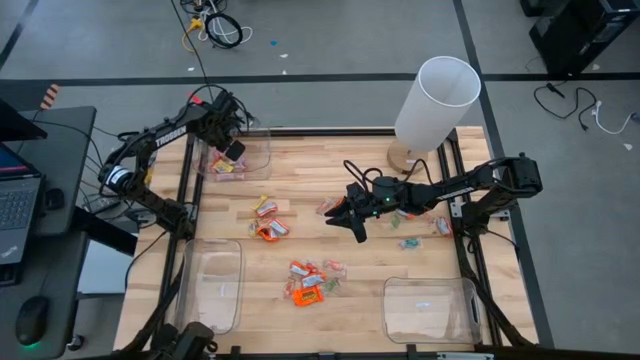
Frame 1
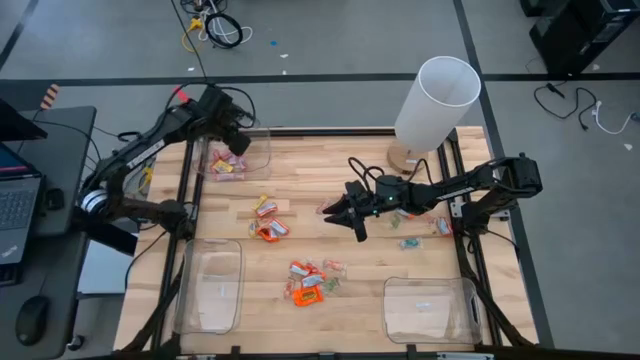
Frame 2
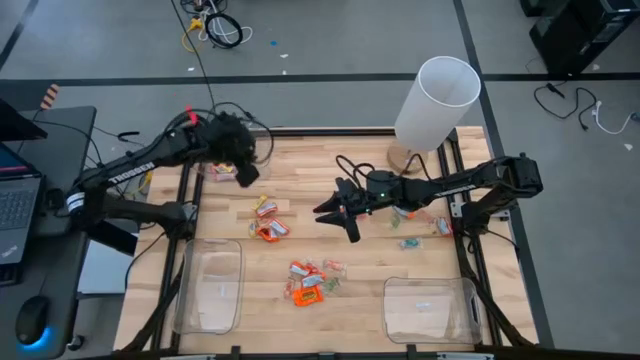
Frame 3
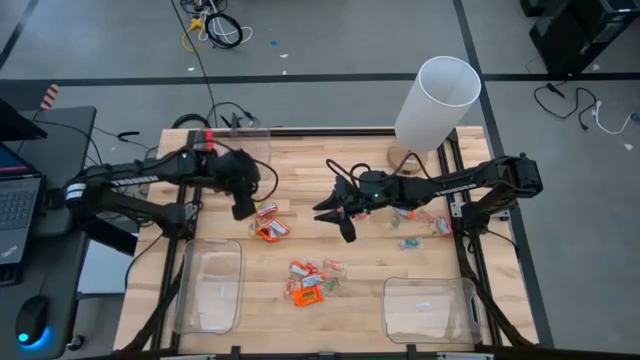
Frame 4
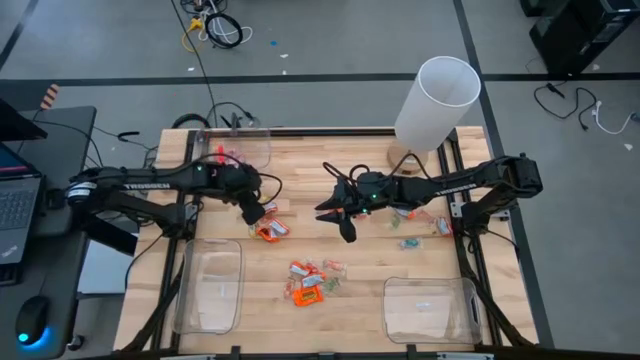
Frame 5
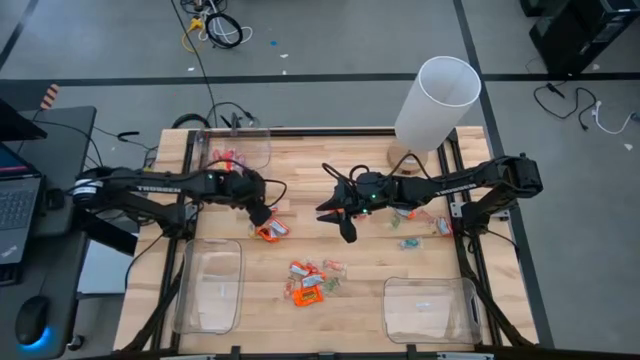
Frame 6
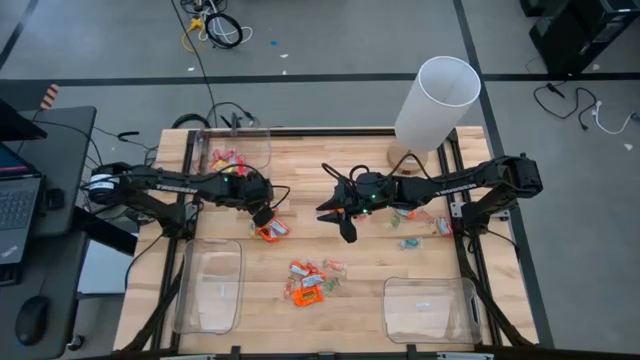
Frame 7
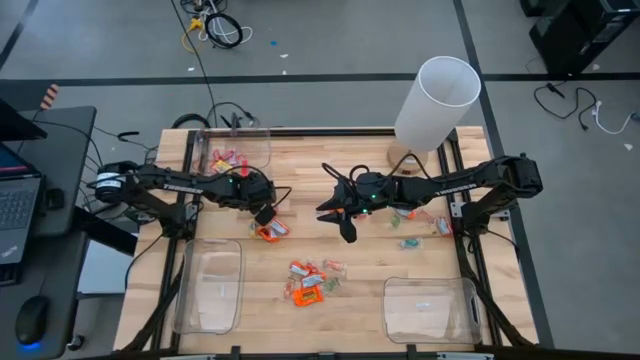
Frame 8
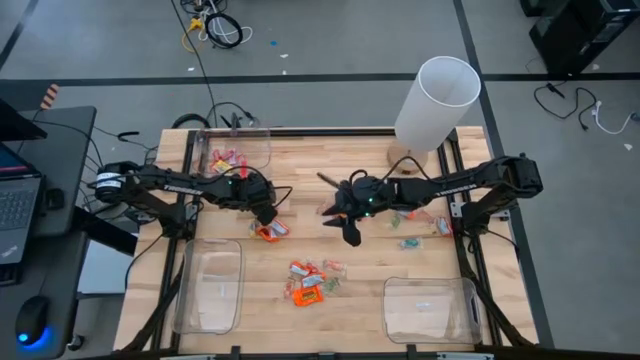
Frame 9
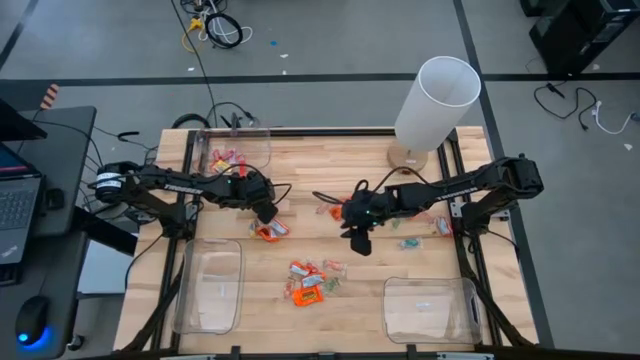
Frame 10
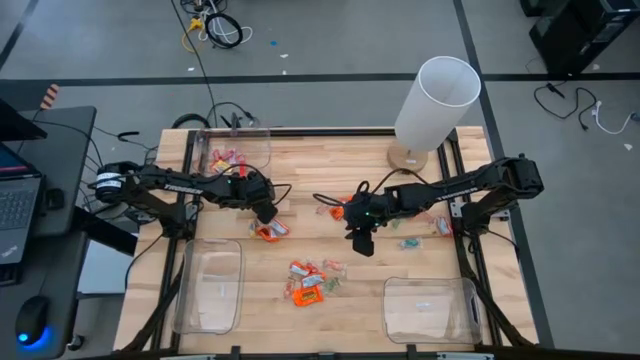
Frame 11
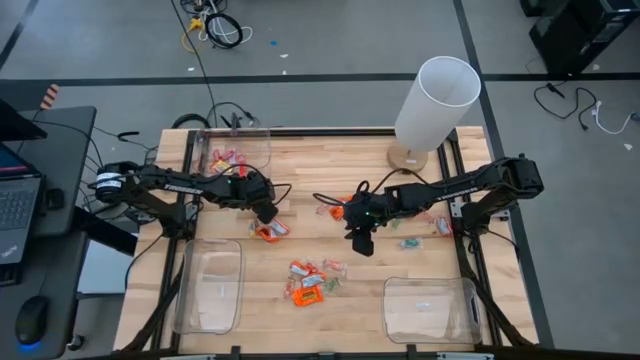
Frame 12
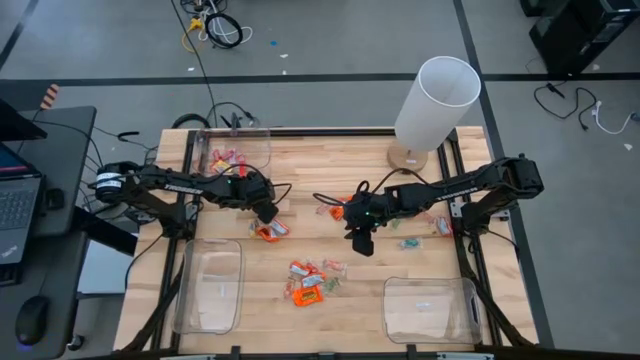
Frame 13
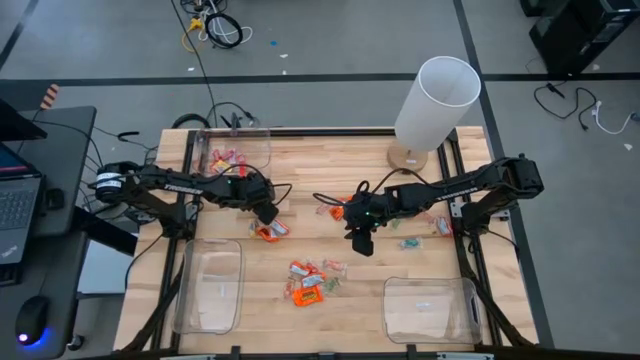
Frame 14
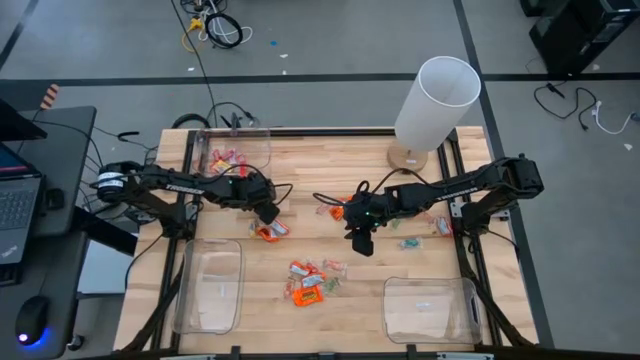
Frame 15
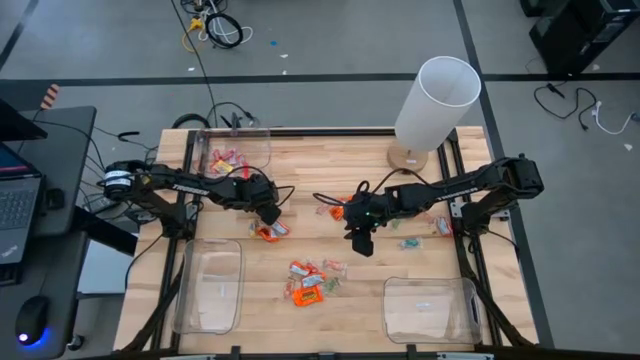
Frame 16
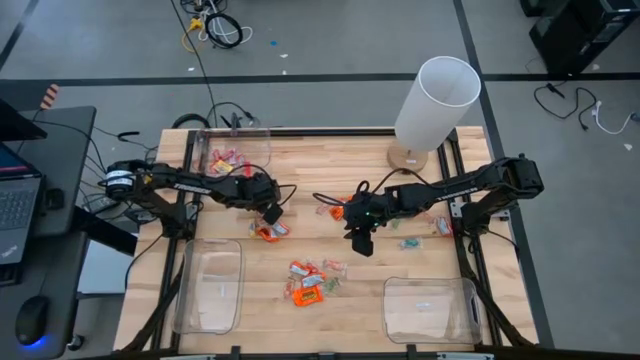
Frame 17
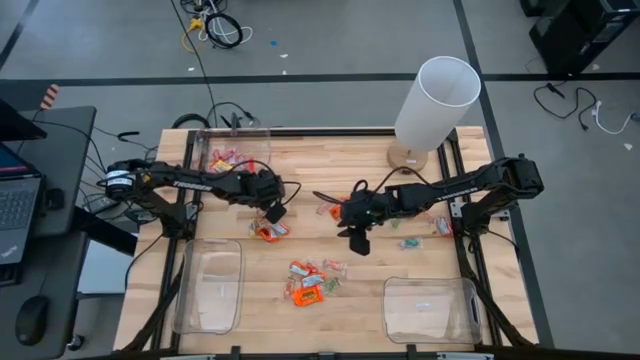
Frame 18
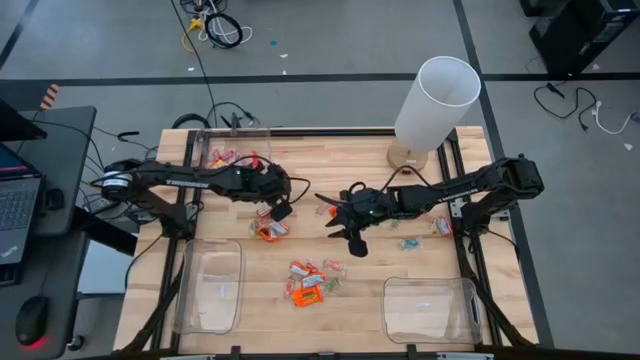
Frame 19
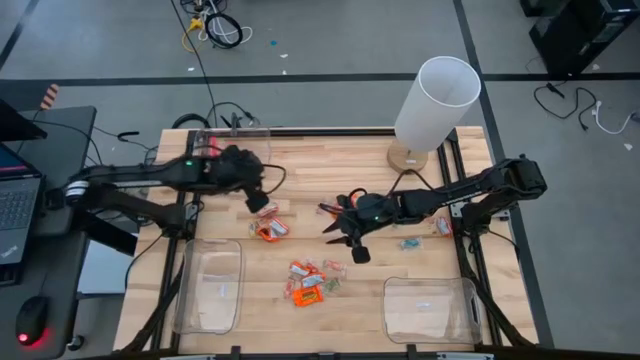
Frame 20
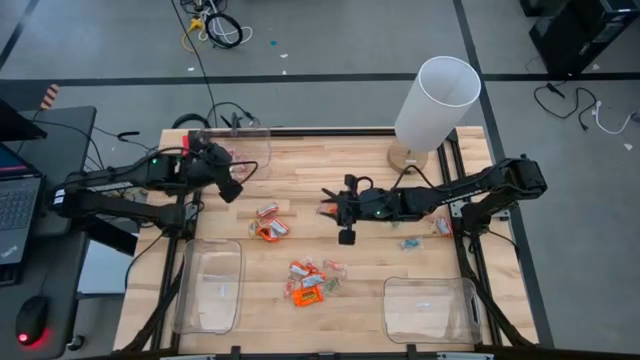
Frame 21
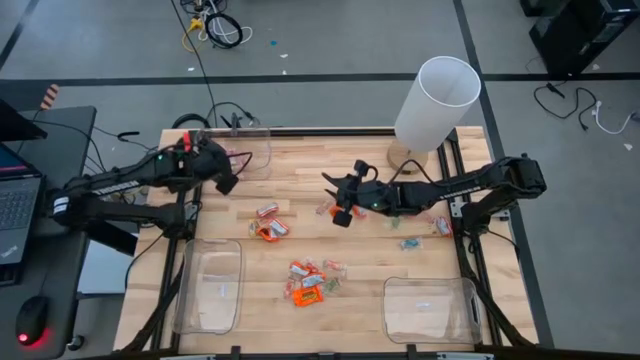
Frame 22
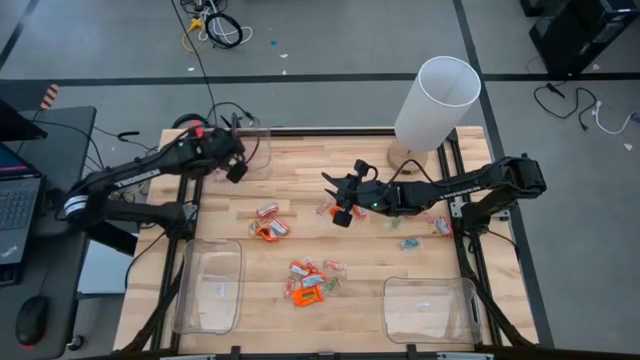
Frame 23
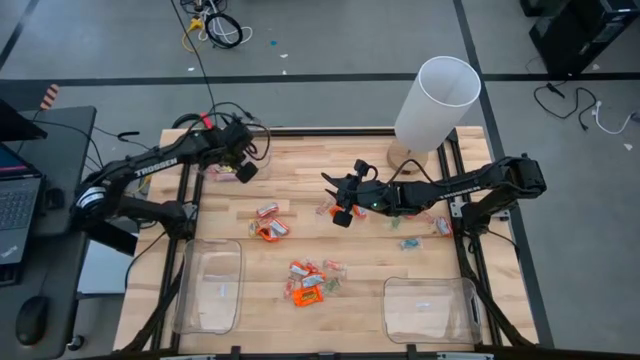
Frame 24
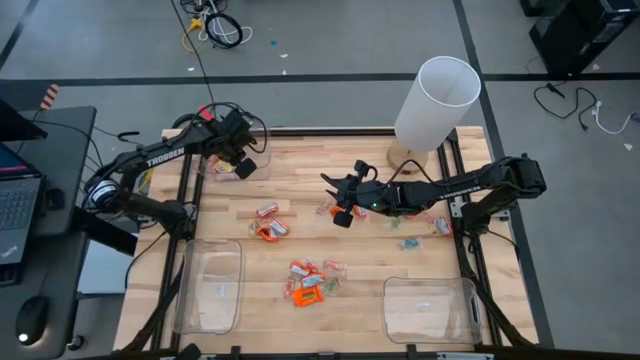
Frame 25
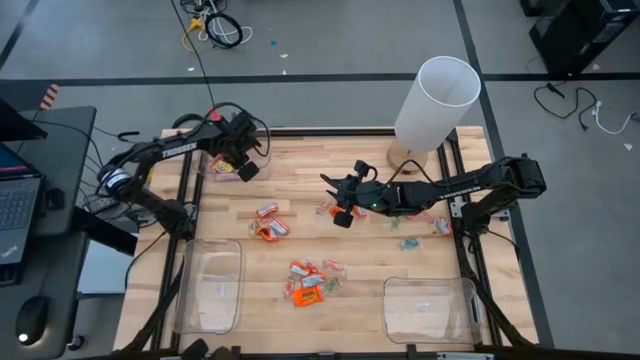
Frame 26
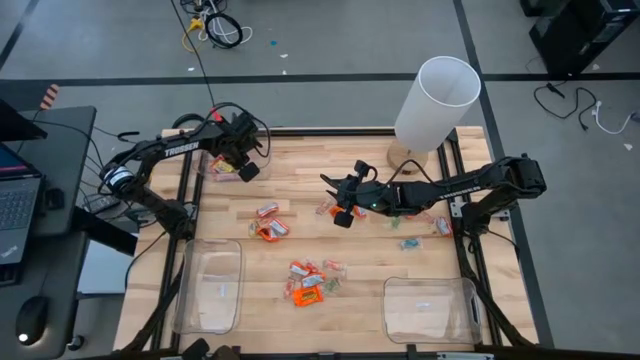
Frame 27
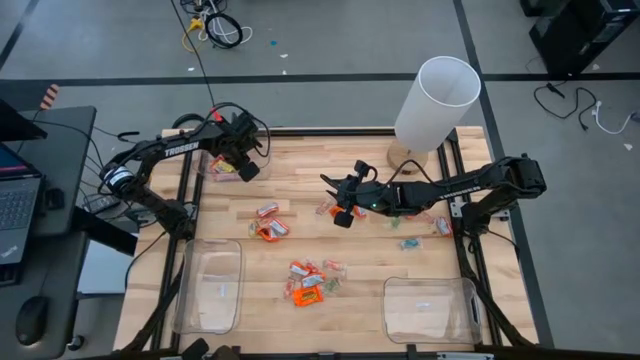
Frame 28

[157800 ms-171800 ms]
Task: Sort candy
Put the yellow candy into the top left transparent bin

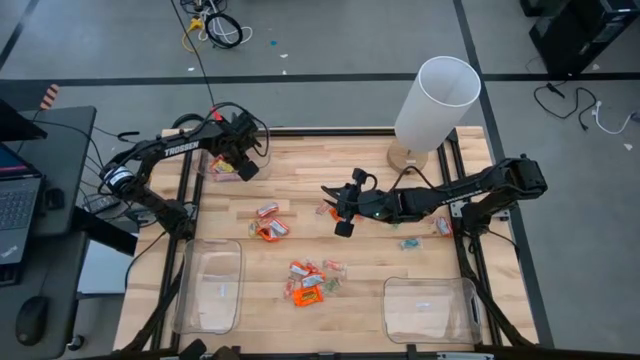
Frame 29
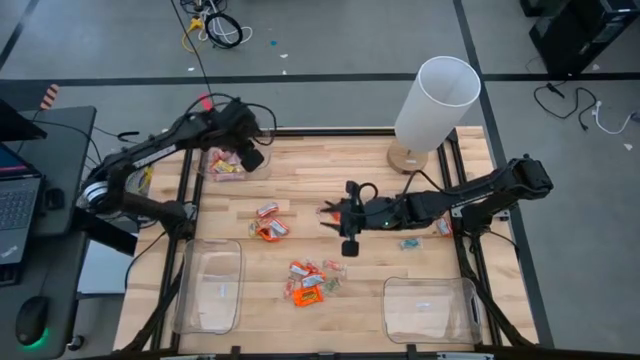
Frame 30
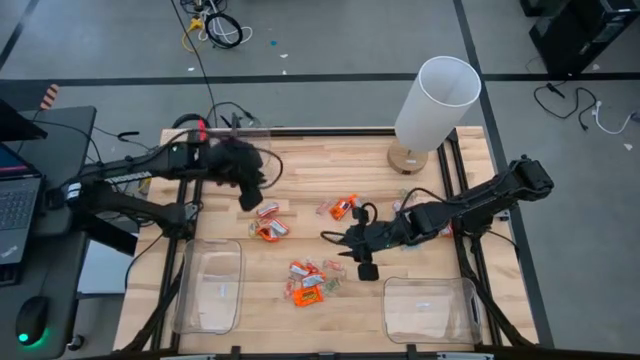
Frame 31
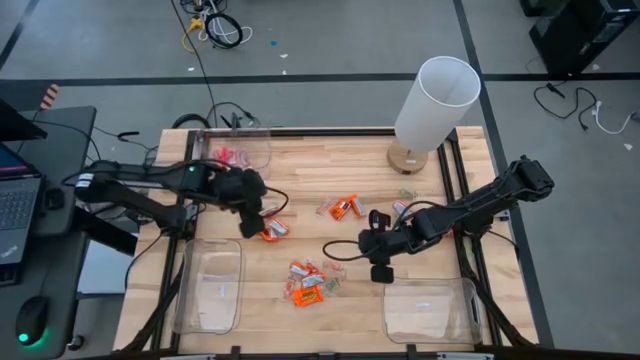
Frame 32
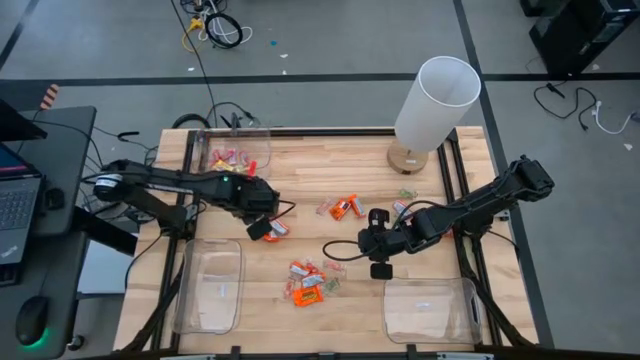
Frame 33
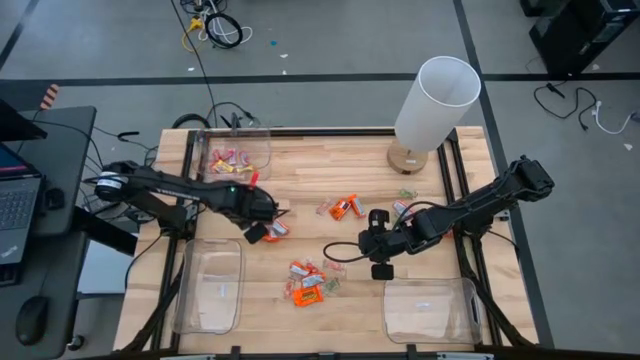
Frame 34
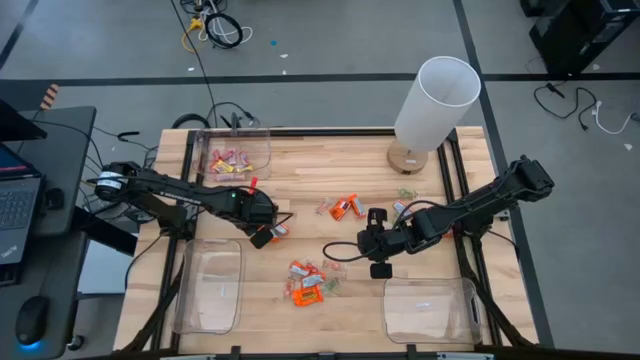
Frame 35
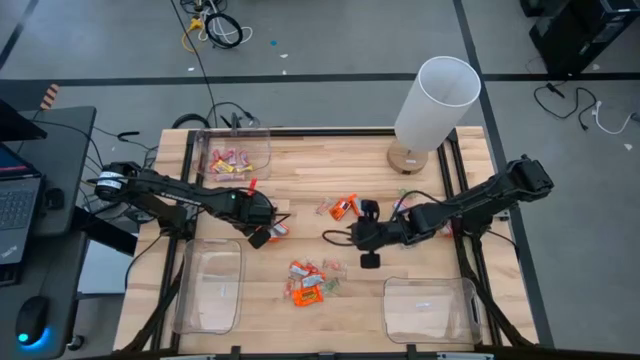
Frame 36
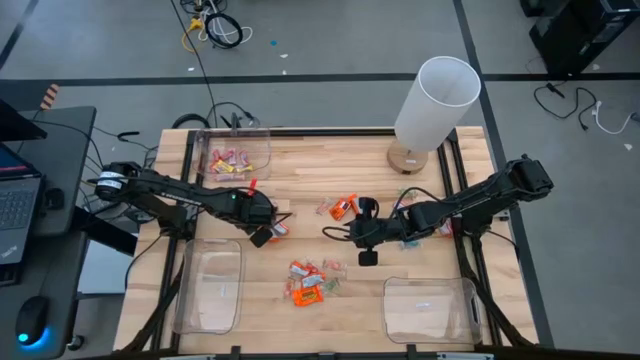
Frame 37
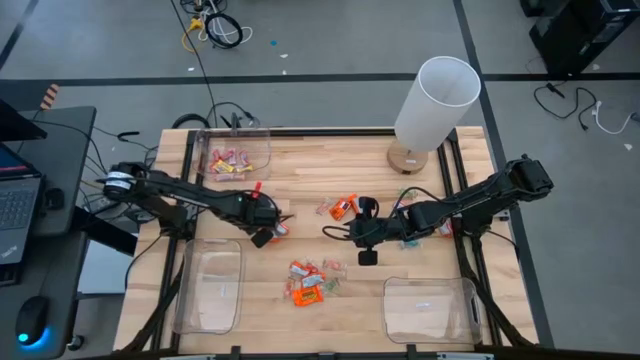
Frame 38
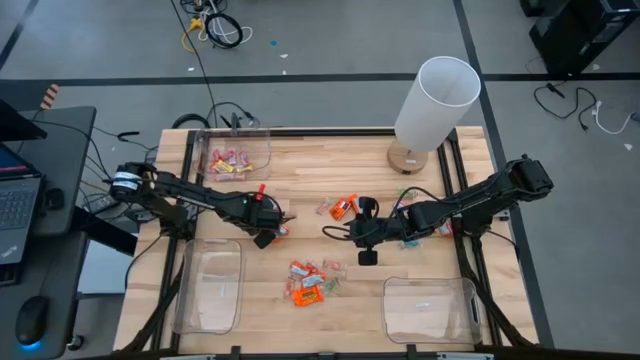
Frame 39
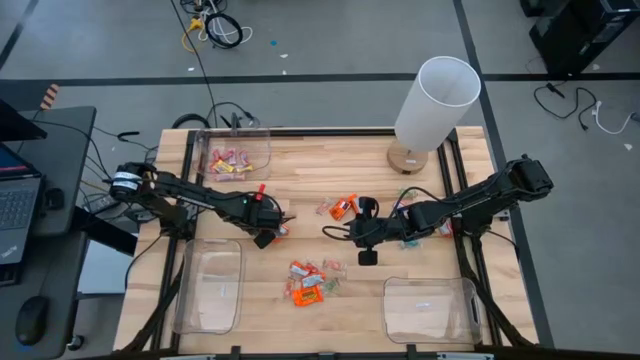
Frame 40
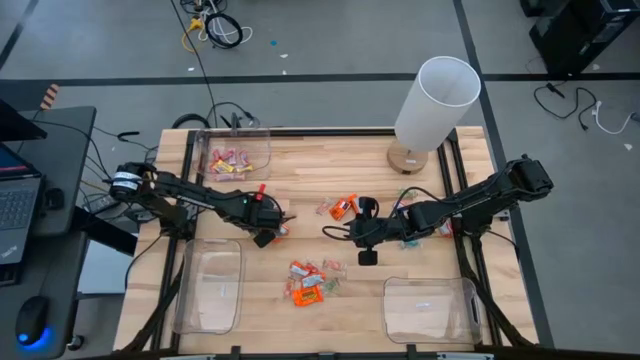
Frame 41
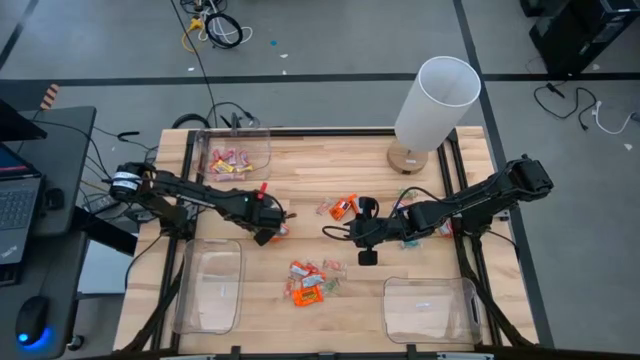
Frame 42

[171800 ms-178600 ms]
Put the yellow candy into the top left transparent bin

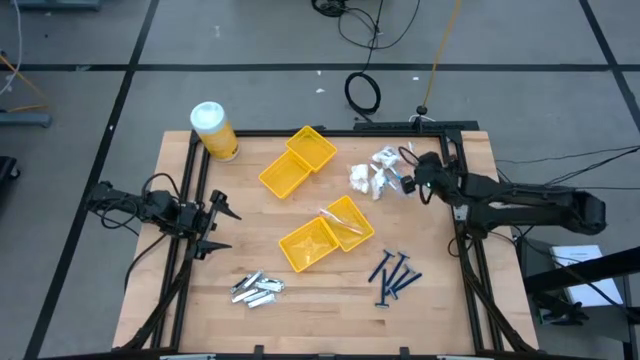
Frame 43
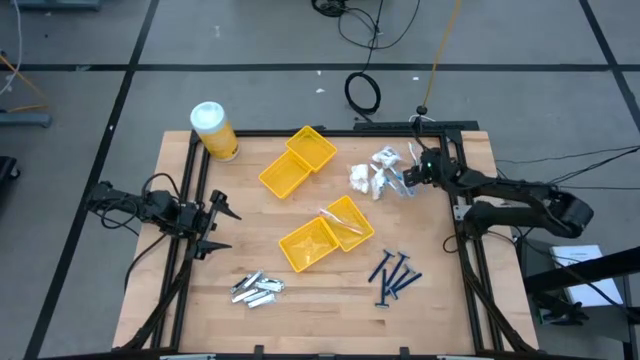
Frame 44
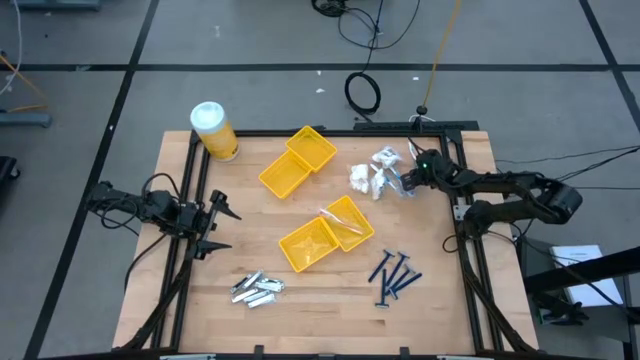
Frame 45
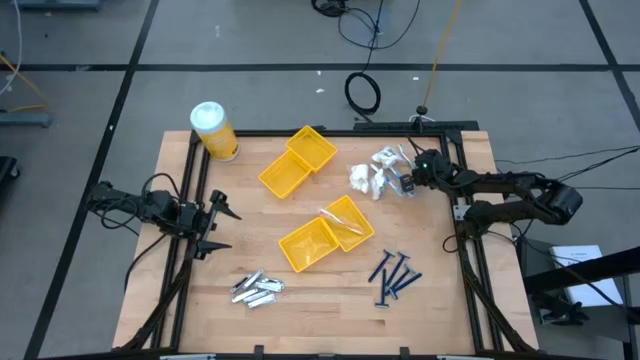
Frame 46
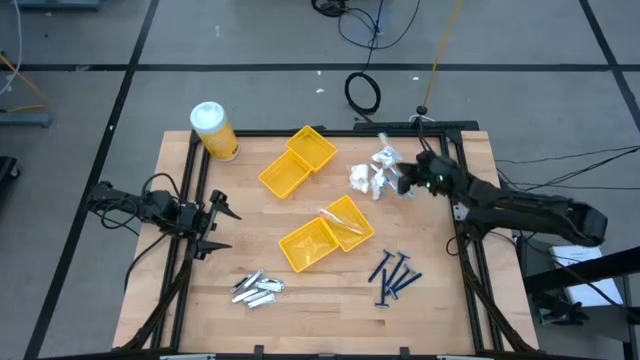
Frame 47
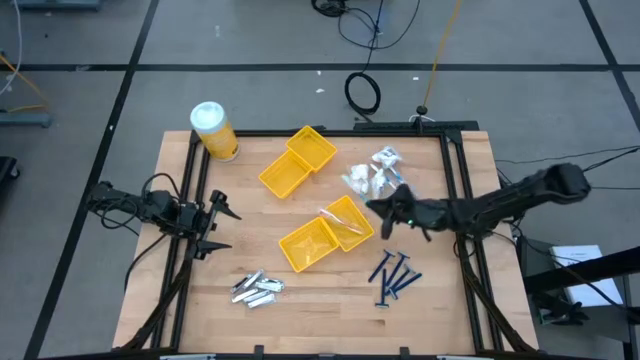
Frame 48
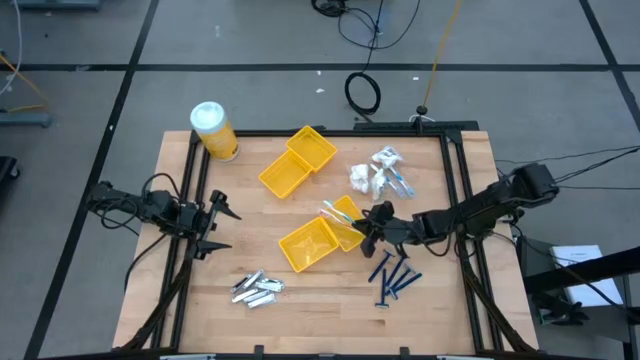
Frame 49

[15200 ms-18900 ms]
Task: Pick & Place Travel size toiletries
Put the green toothbrush into the bottom right yellow basket
